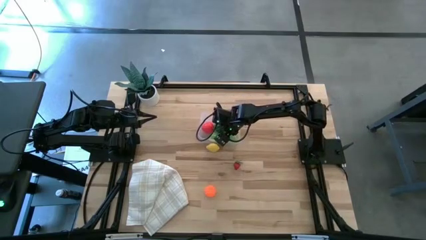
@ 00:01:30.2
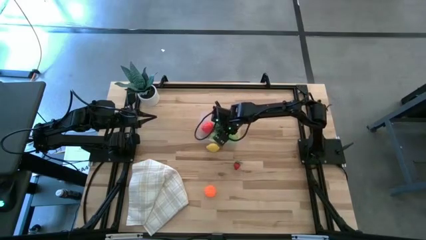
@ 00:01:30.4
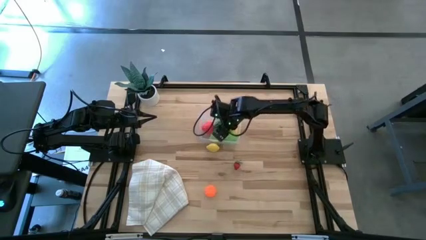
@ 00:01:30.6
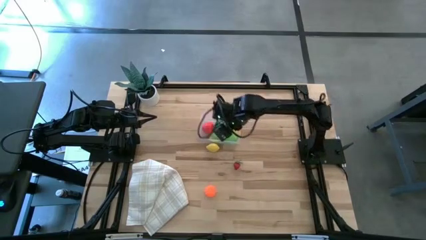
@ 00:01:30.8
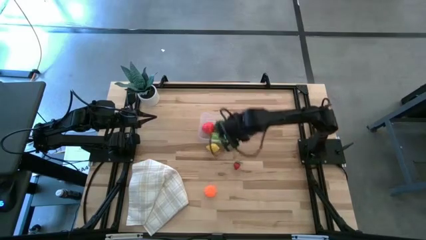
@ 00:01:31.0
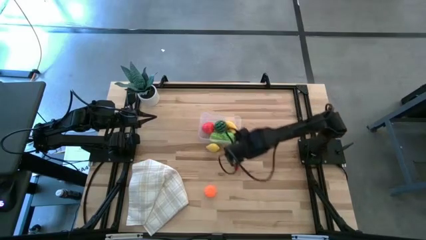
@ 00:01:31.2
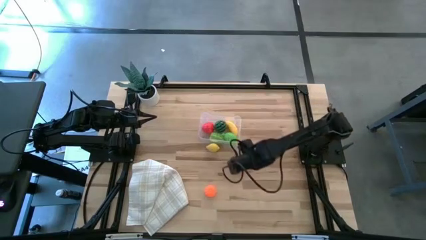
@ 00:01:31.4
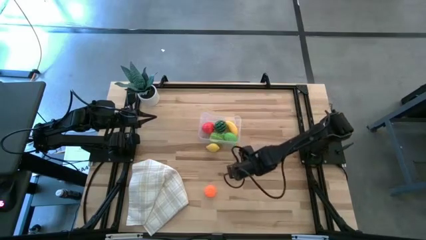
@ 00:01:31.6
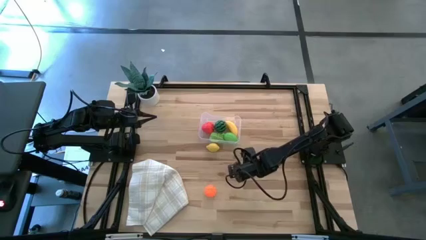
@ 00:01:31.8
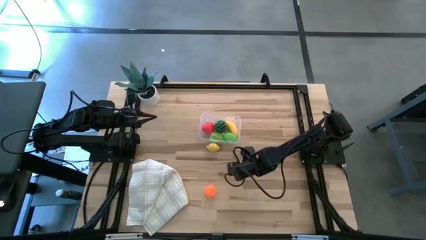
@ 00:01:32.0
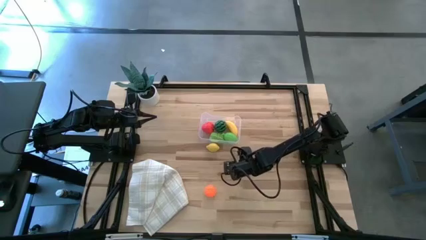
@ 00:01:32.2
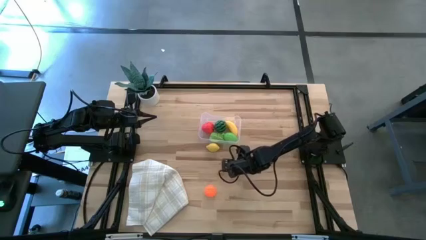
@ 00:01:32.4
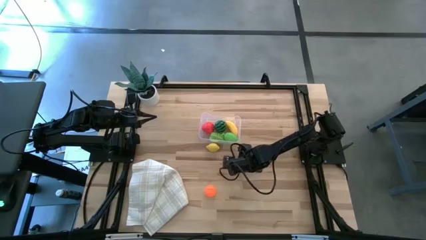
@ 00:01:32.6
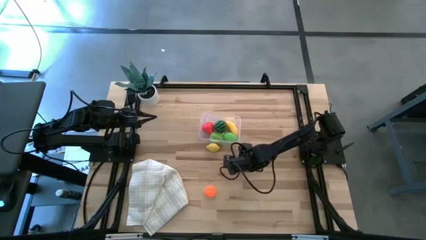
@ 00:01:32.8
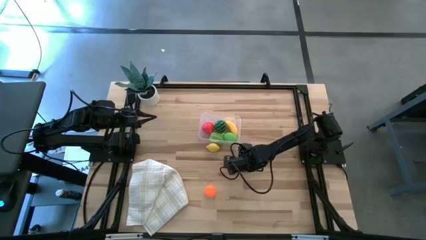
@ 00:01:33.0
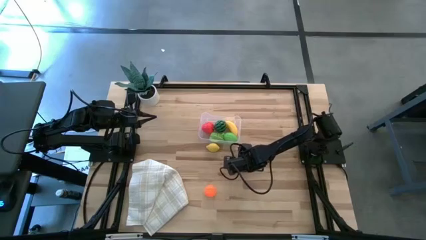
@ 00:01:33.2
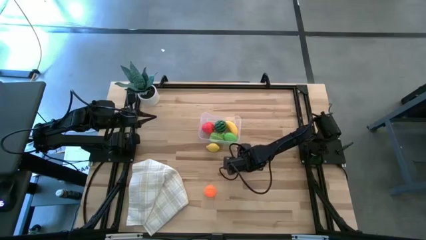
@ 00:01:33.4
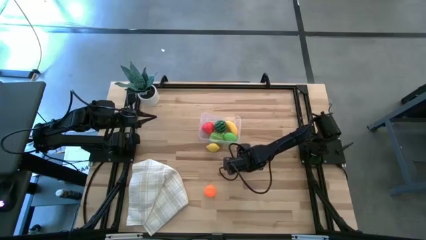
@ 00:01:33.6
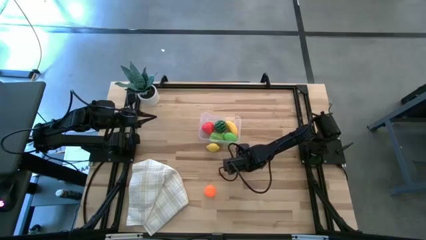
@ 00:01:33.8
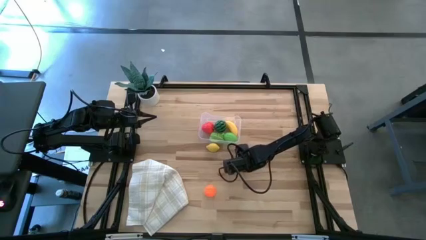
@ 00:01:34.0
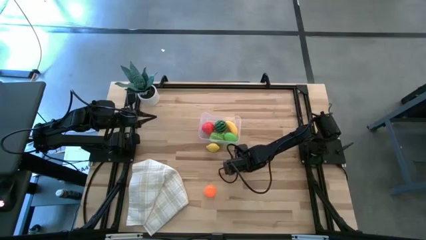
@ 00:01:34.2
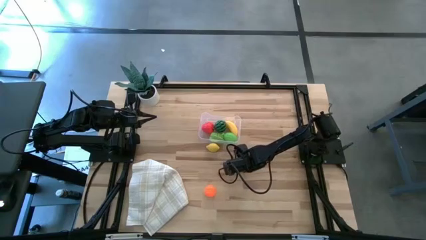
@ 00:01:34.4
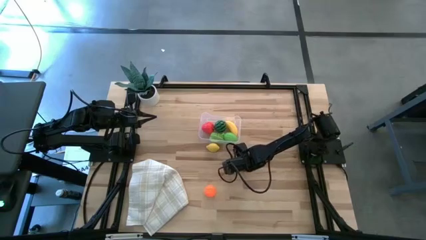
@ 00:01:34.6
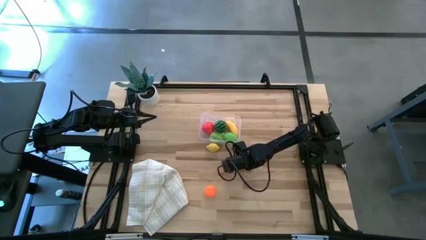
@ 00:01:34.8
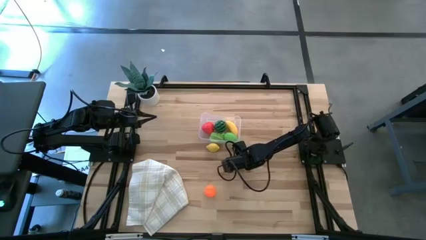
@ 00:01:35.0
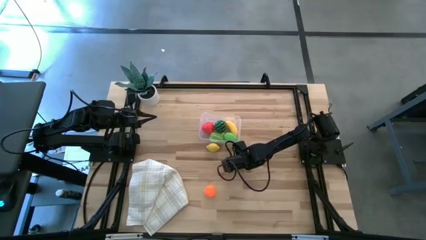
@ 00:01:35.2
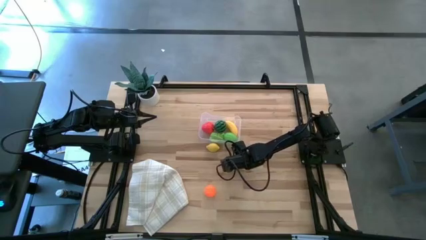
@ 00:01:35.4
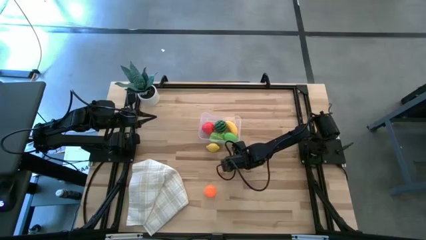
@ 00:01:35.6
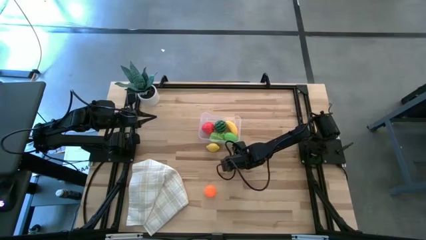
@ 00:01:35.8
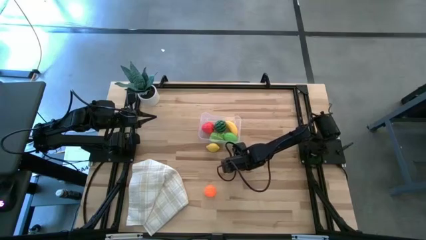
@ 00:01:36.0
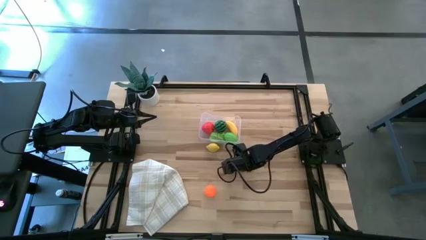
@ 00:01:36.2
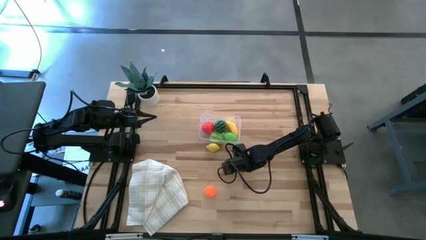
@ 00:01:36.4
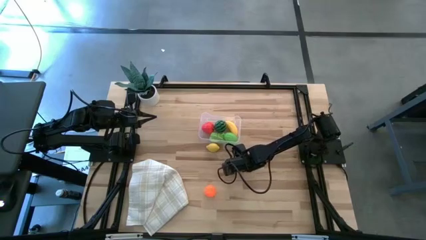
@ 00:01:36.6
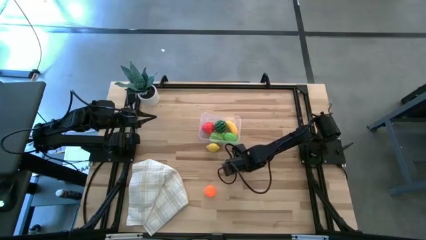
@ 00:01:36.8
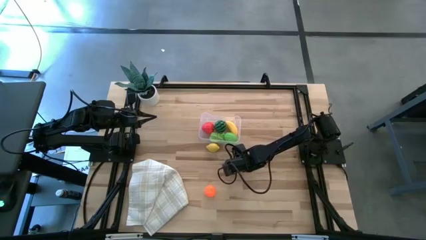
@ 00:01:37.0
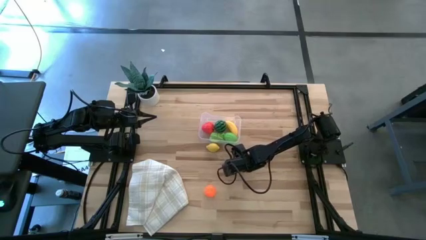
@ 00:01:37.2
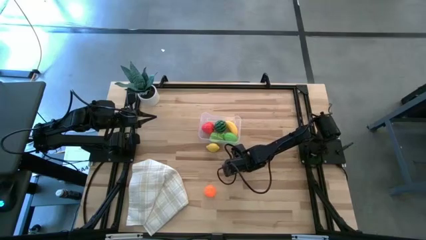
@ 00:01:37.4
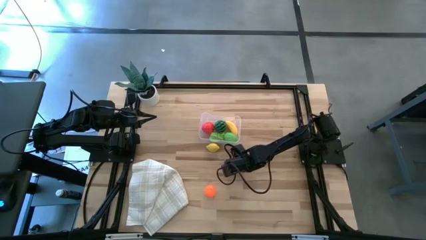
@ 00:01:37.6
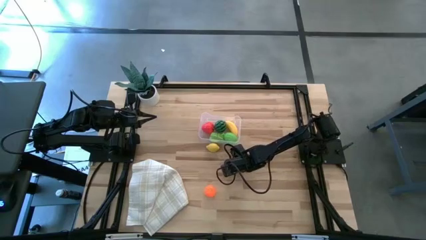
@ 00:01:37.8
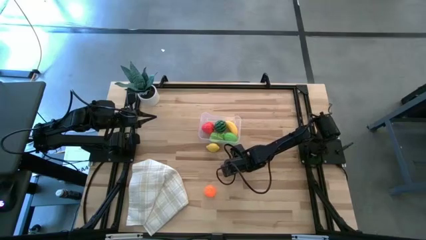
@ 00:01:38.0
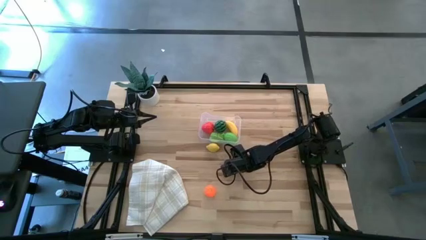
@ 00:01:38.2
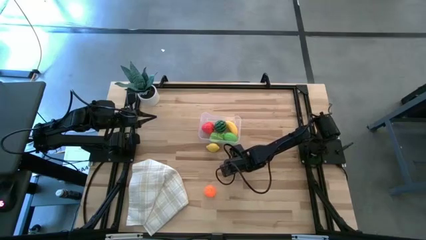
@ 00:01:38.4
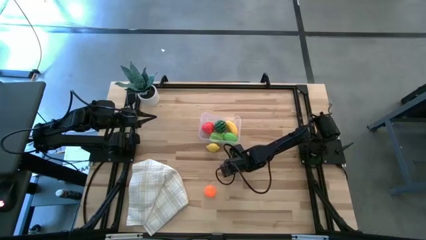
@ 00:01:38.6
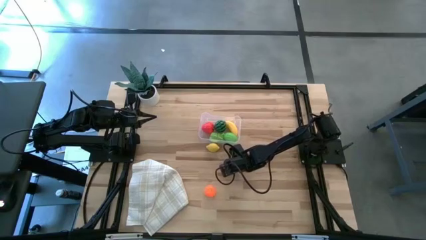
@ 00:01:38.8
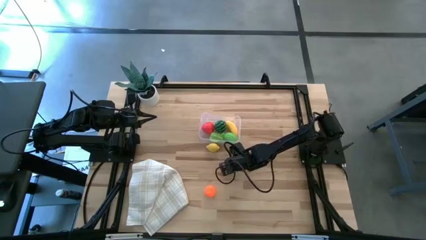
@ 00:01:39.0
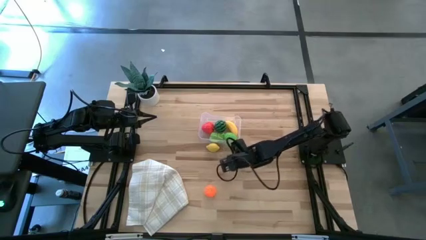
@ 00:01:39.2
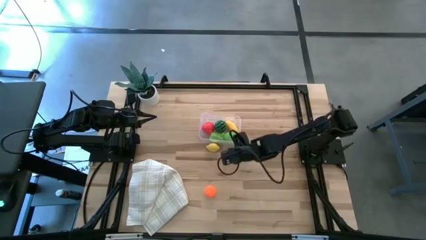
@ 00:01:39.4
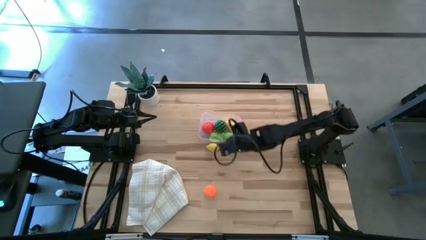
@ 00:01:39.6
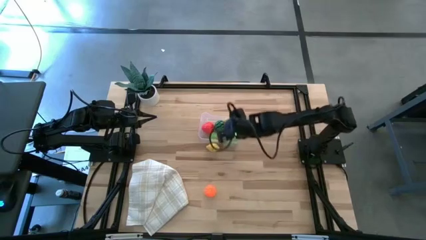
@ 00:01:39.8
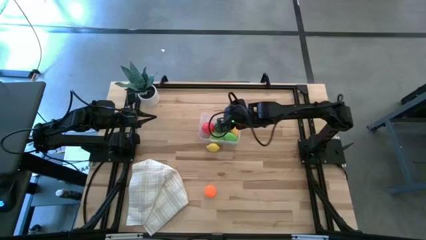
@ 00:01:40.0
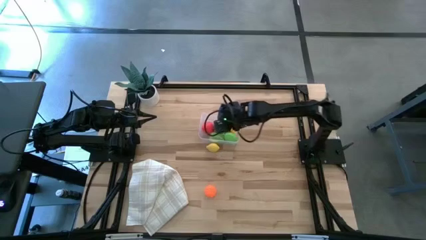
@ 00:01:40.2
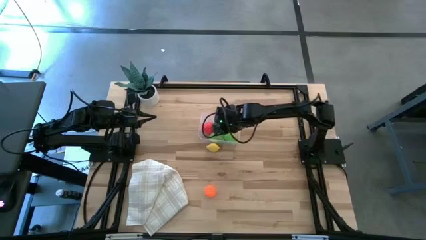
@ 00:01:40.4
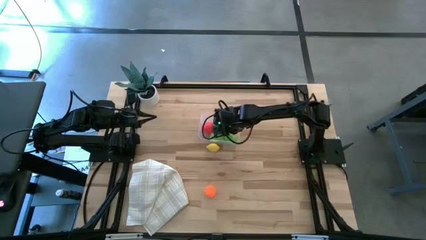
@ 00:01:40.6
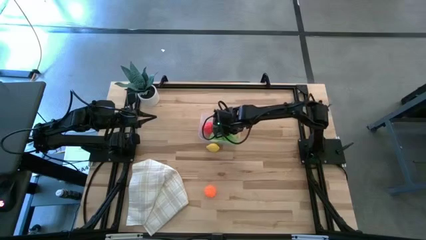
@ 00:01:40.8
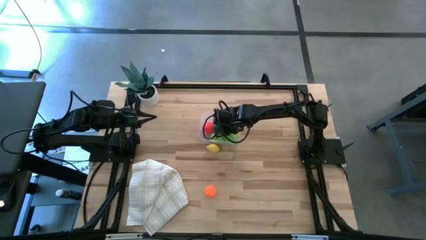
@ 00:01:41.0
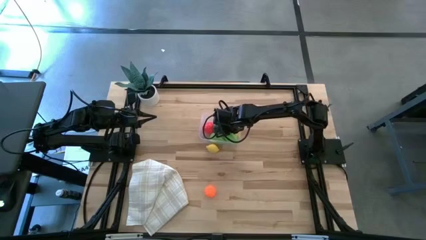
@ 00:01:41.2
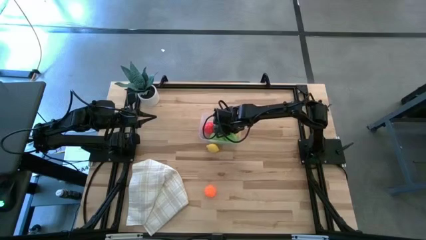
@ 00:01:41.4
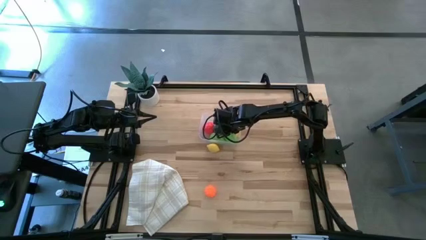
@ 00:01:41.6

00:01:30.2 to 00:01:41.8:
Task: Pick and placing Produce into tupperware
Put the strawberry into the transparent bin

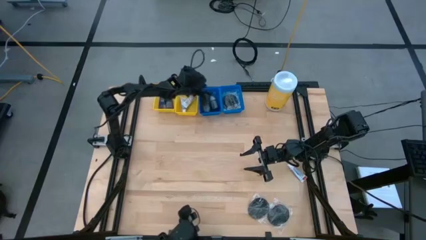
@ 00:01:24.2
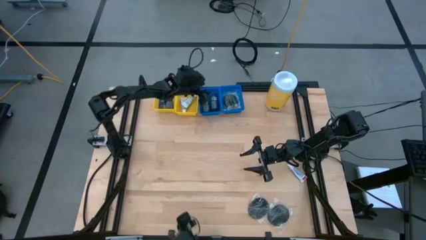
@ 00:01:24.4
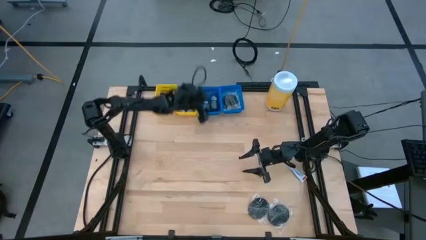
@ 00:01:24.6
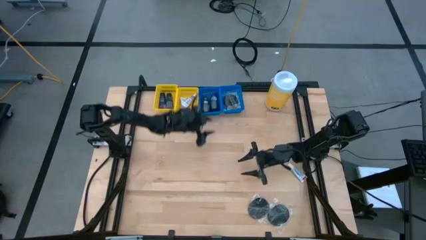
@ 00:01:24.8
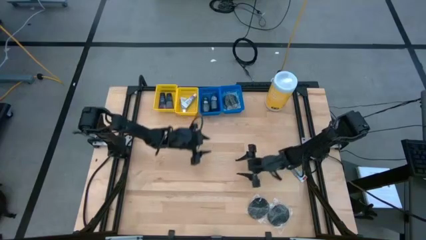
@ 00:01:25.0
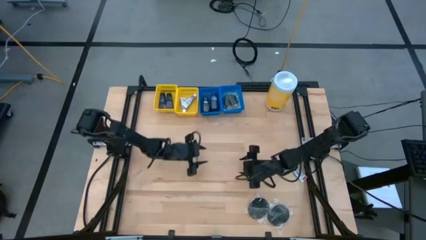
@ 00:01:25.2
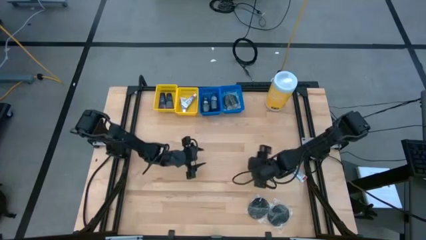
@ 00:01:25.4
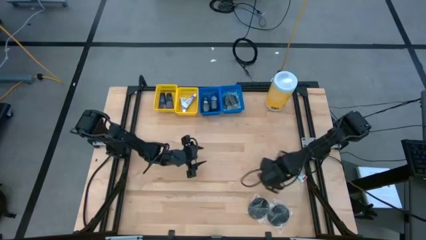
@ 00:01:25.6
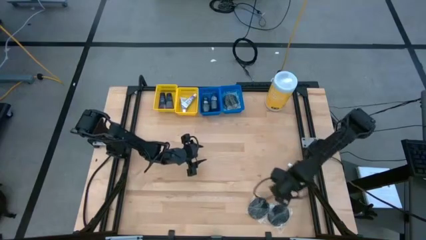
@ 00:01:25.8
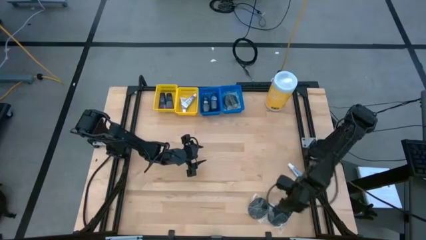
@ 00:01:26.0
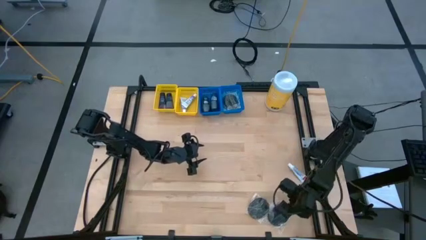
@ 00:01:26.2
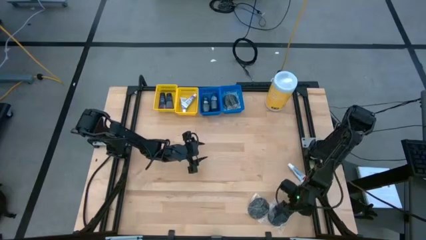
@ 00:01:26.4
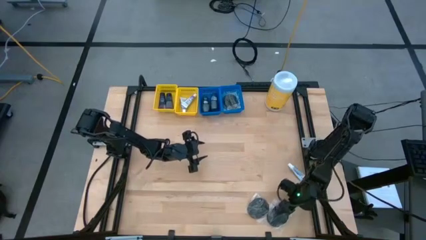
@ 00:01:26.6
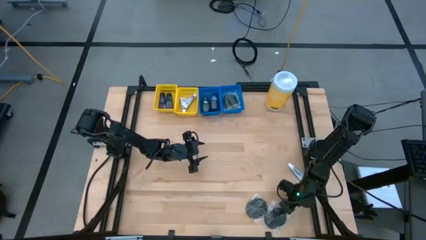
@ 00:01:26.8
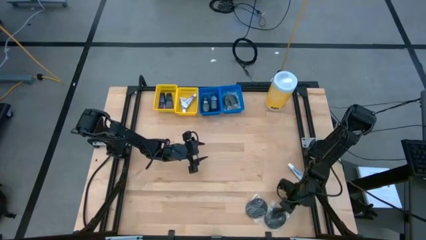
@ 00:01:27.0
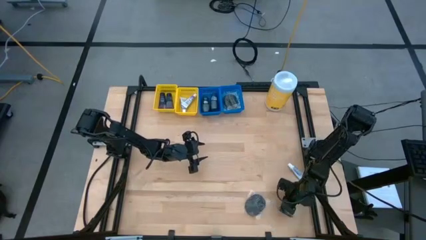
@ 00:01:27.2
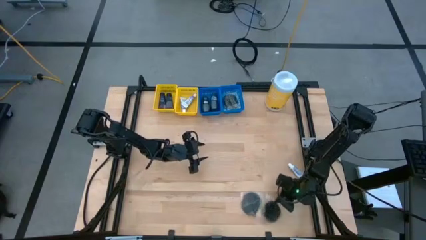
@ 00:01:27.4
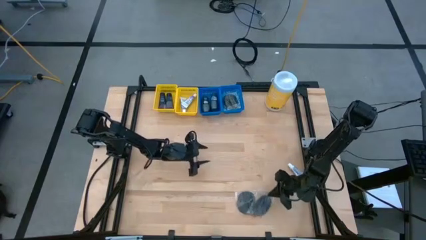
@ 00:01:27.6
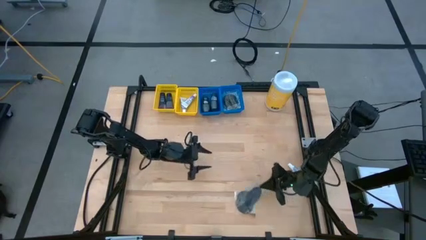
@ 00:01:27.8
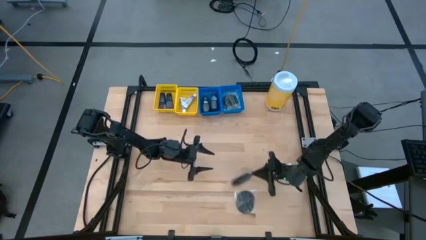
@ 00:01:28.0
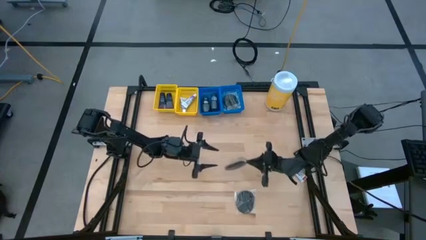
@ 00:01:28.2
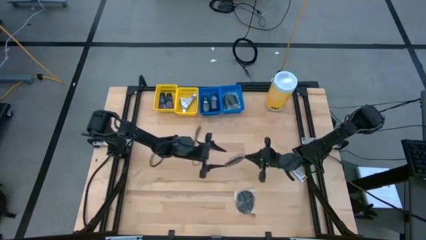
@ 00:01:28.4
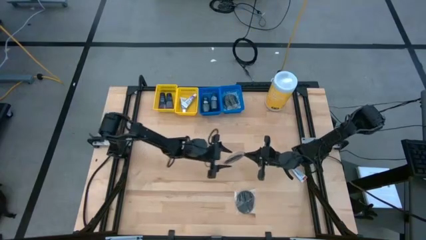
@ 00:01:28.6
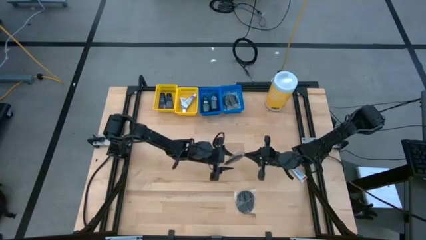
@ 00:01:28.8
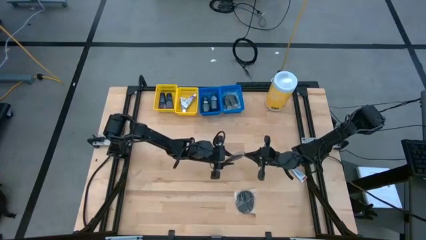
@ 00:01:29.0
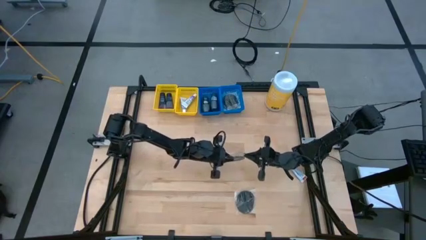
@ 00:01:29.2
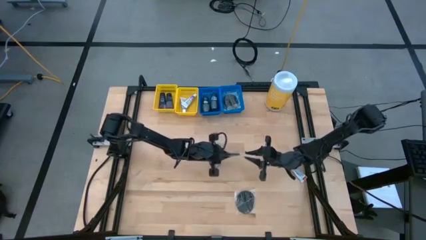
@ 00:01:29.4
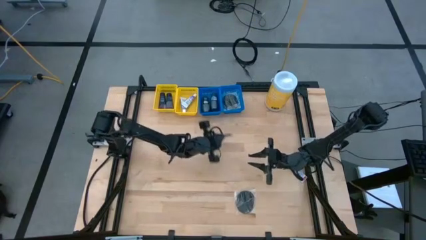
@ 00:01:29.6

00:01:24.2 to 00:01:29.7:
Task: Pick & Place Travel size toiletries
Put the black hairbrush into the right blue bin
